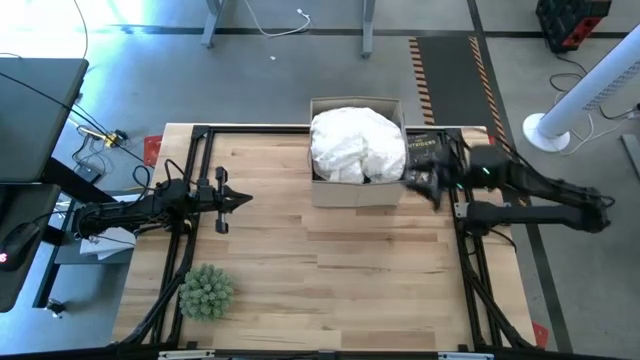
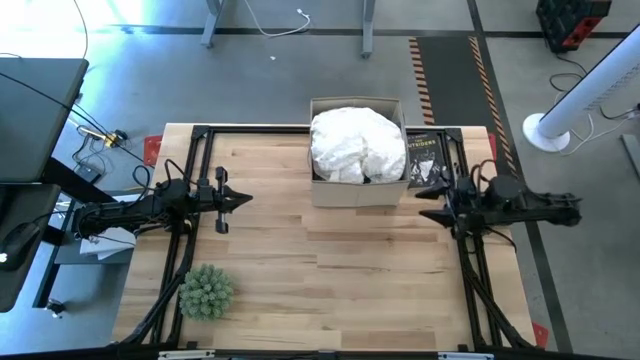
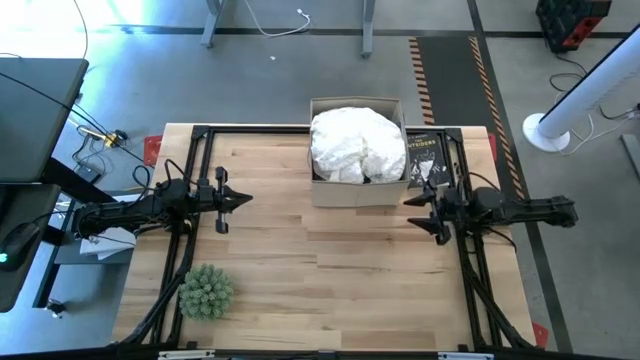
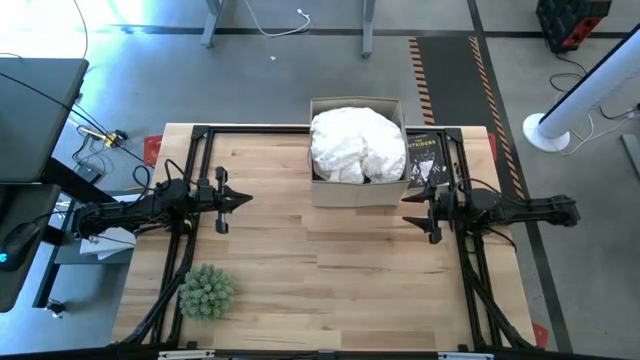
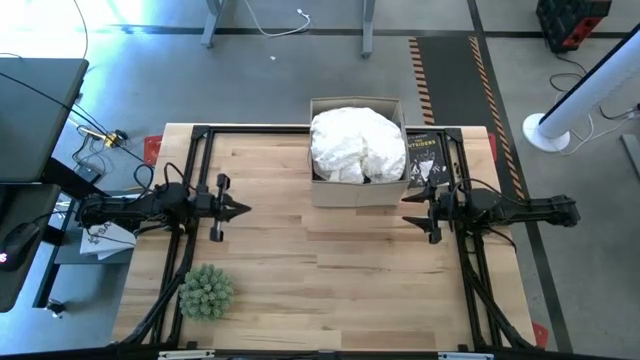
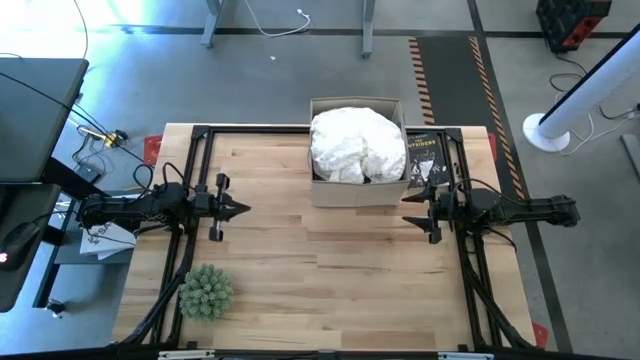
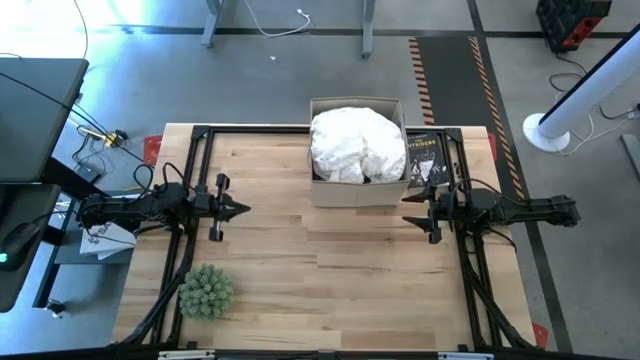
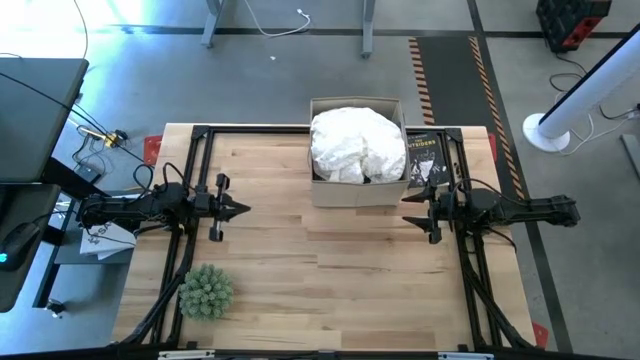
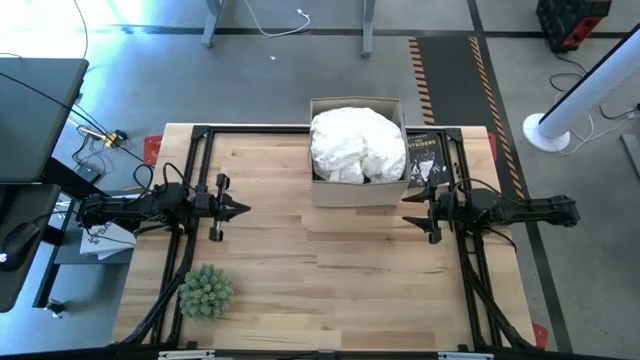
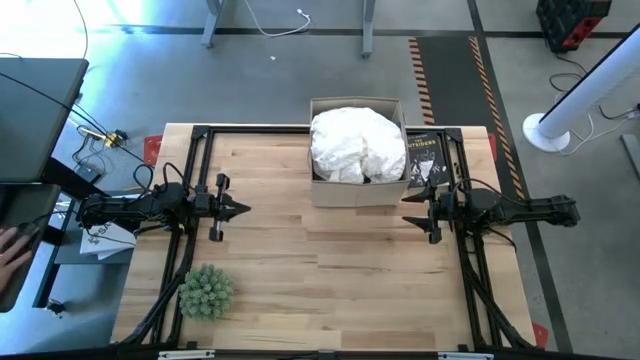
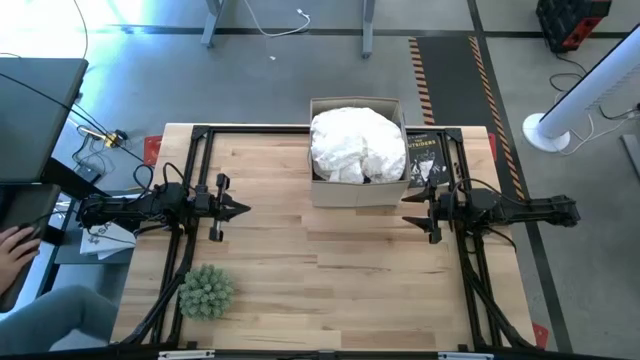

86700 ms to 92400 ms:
Task: Sort clothes
Return to Home Position

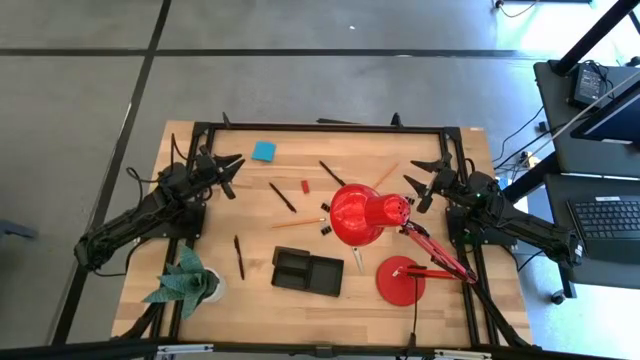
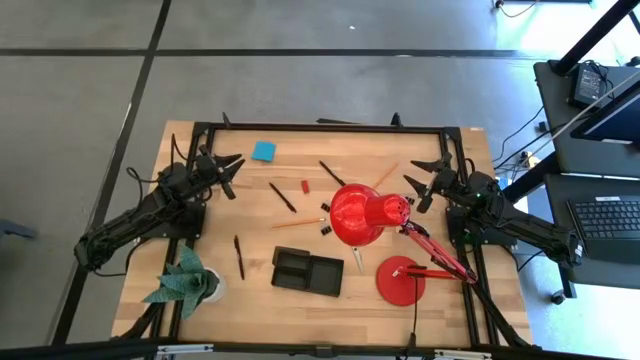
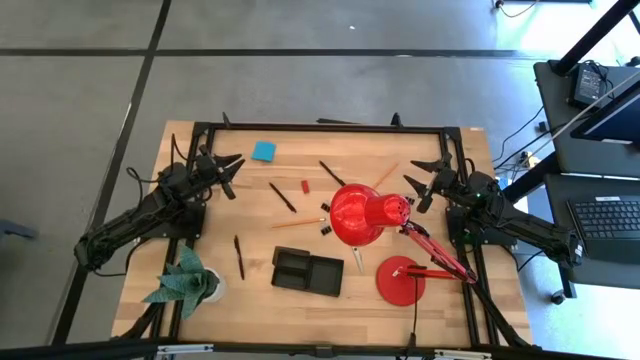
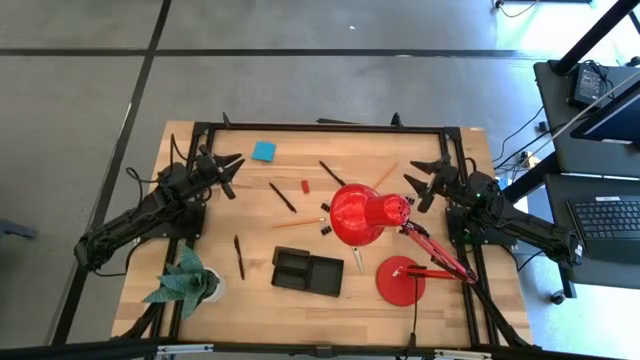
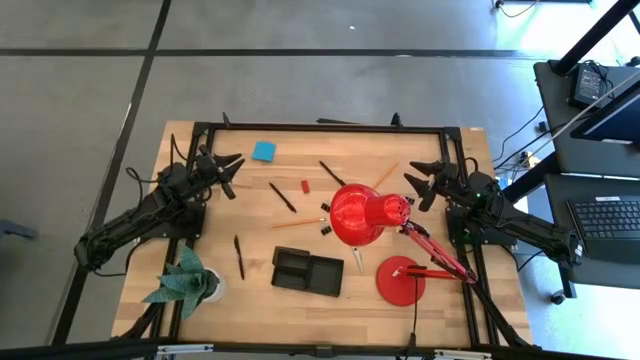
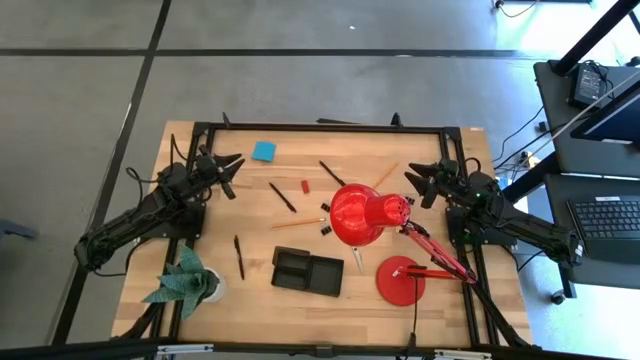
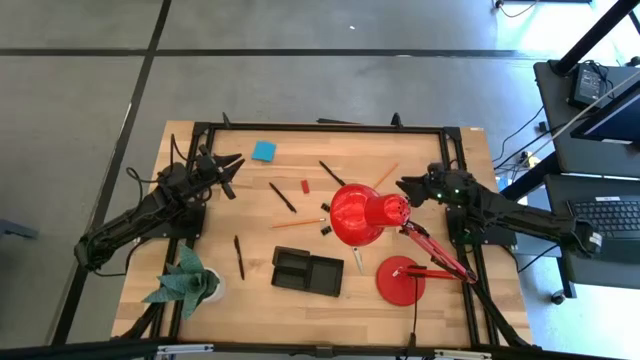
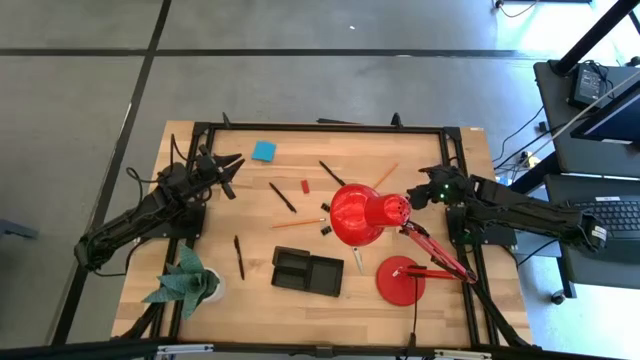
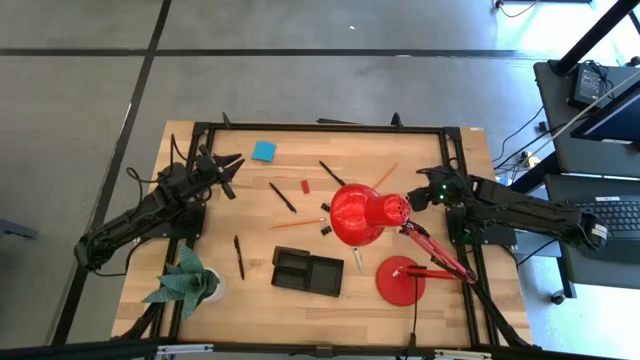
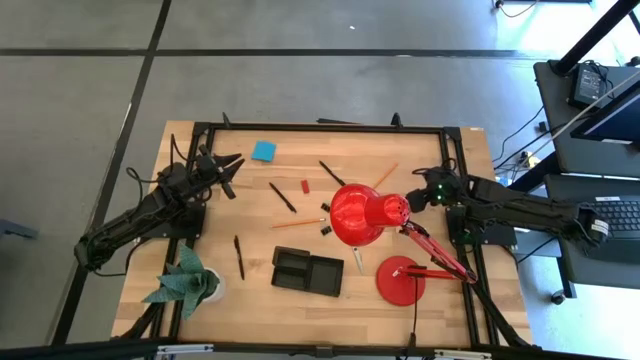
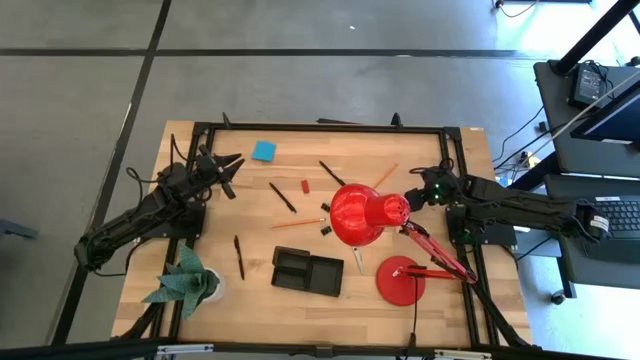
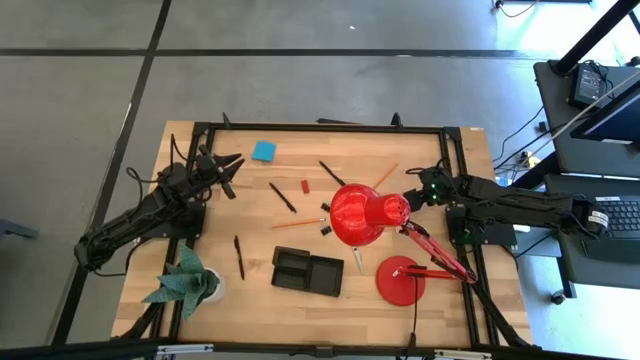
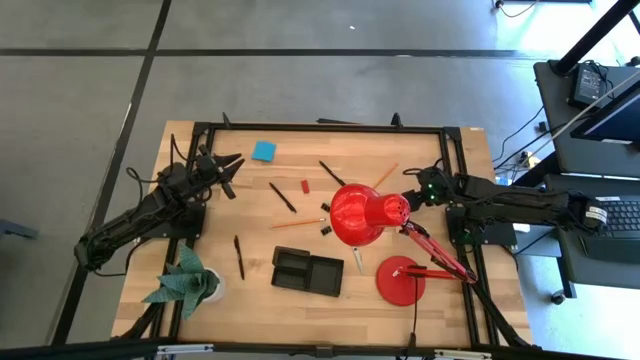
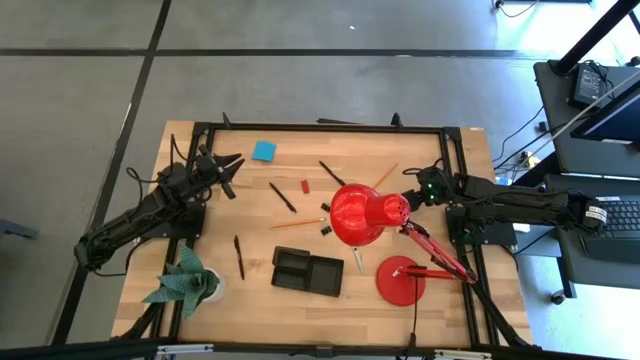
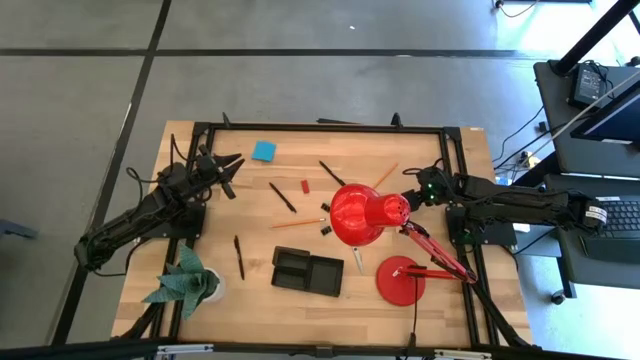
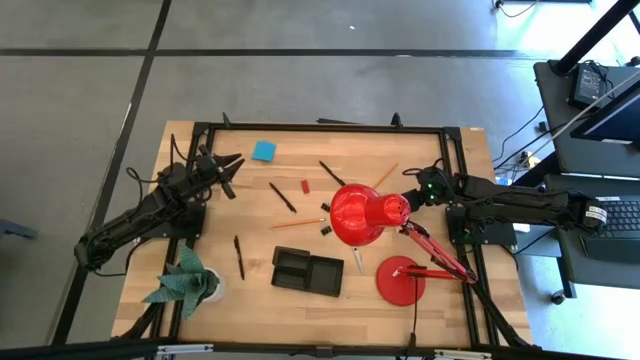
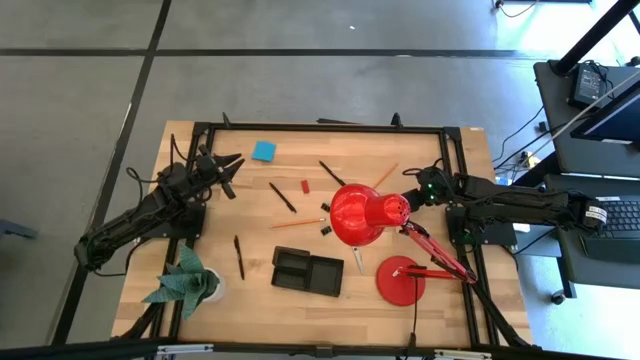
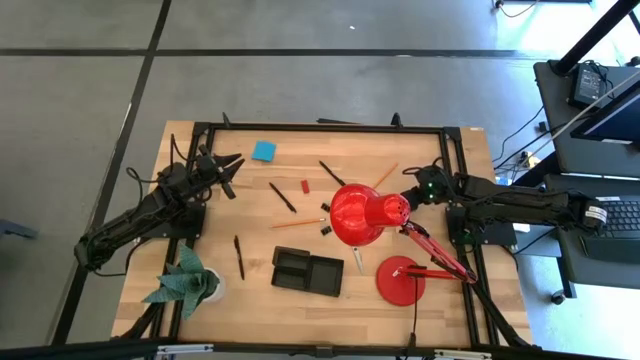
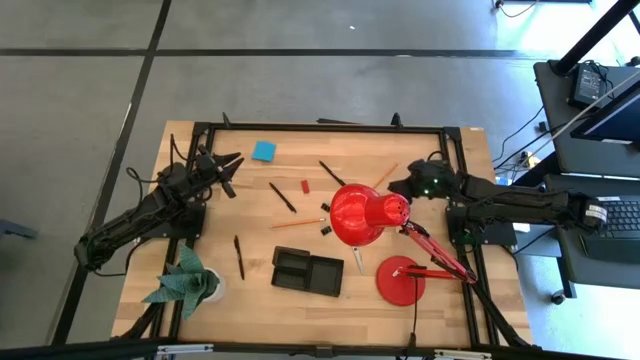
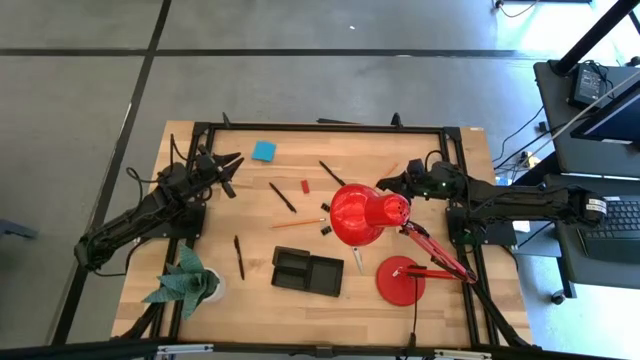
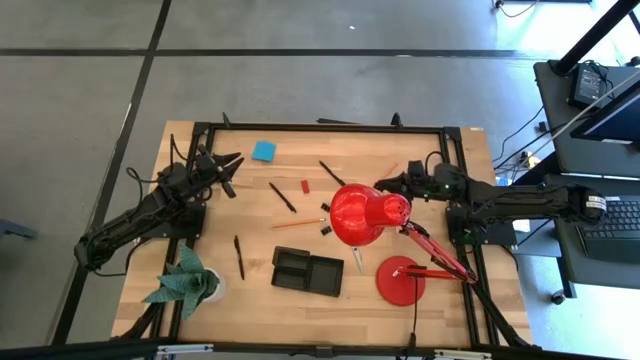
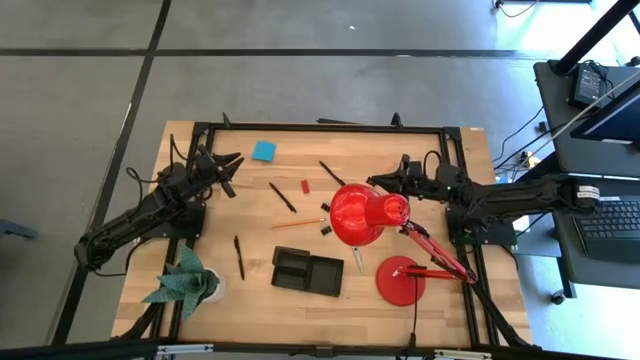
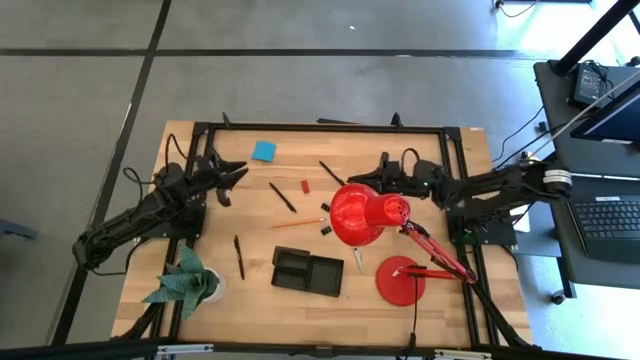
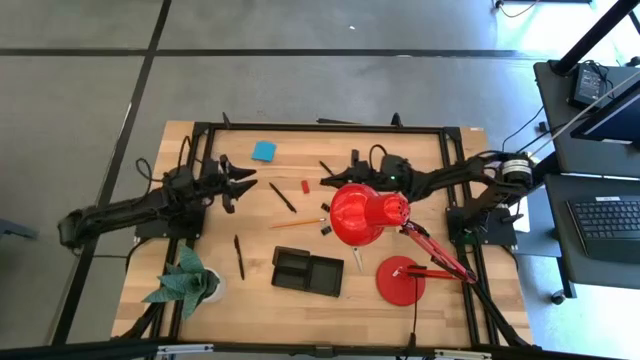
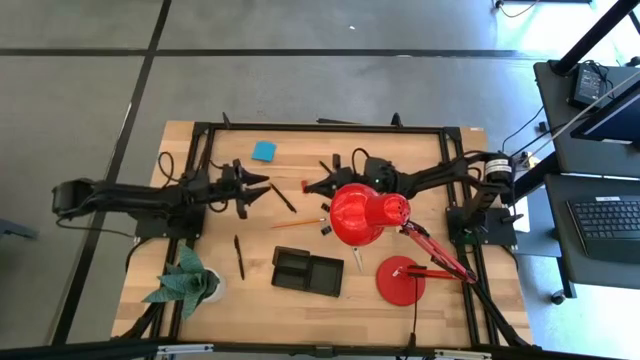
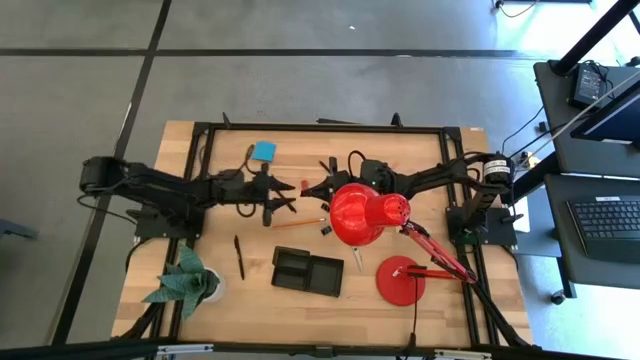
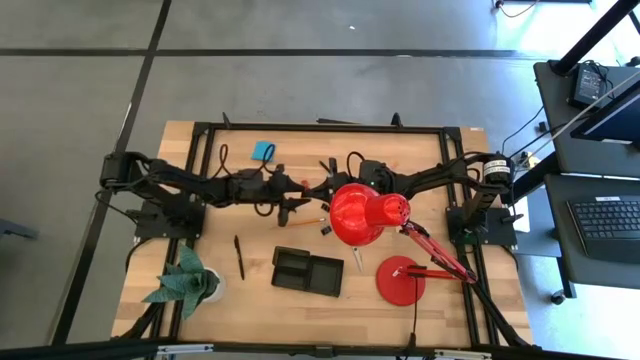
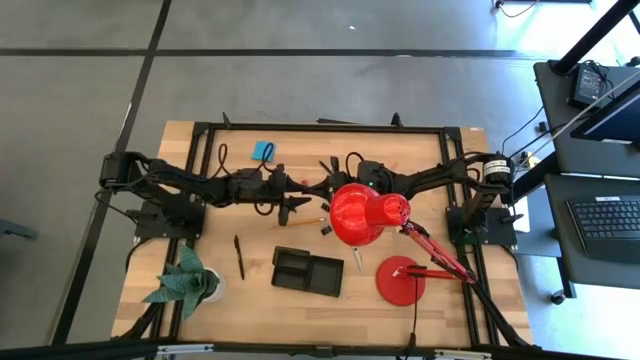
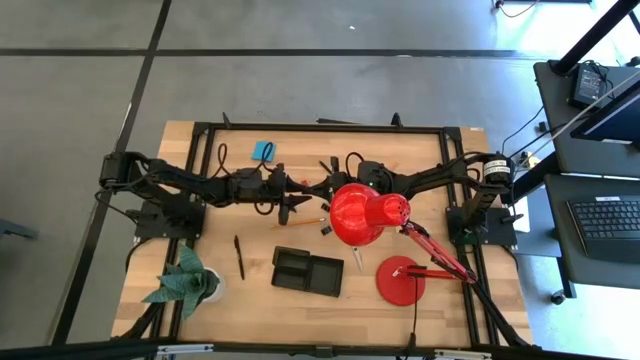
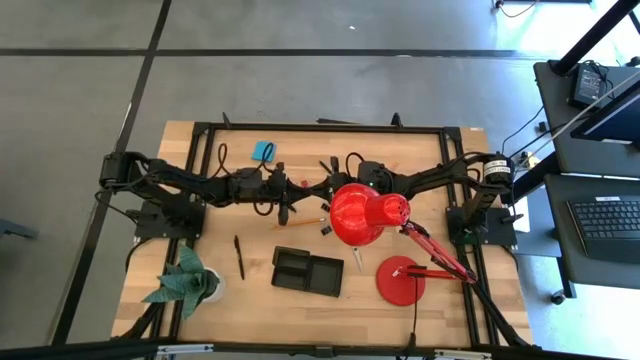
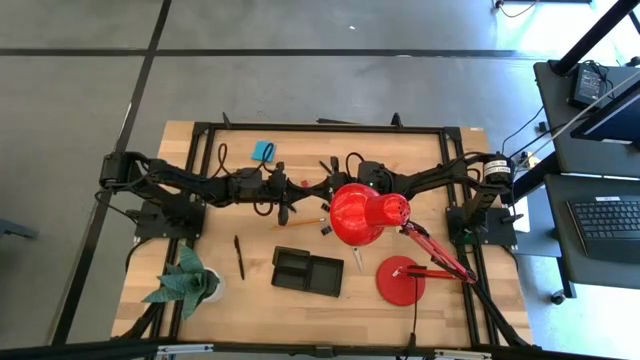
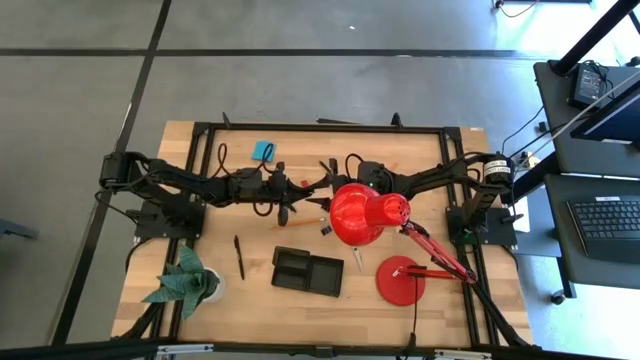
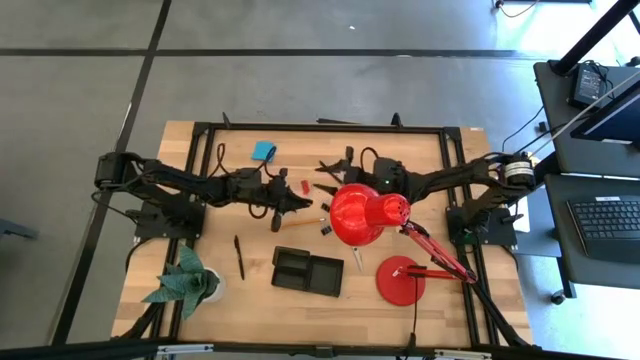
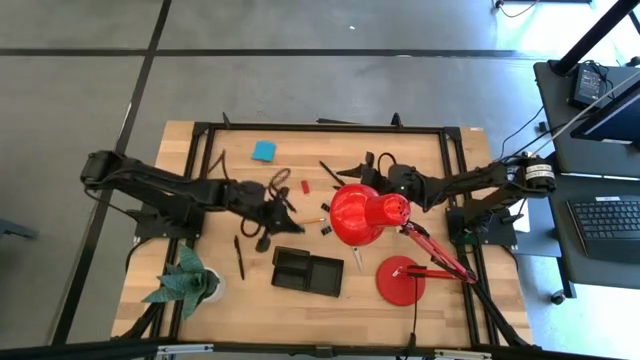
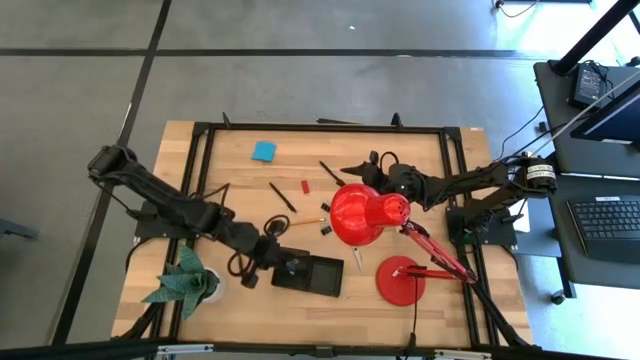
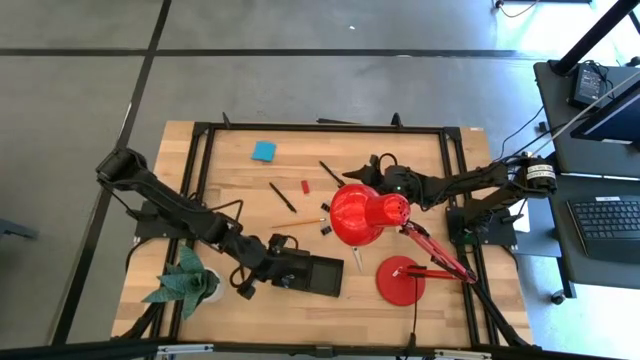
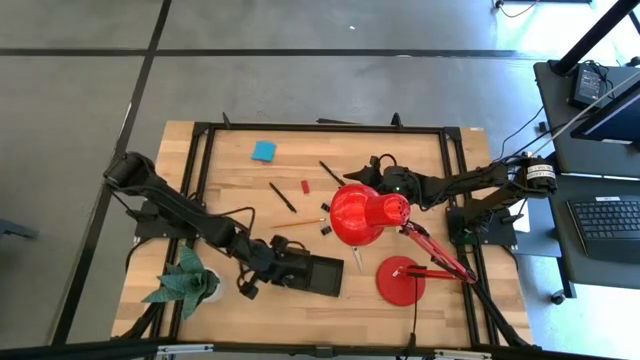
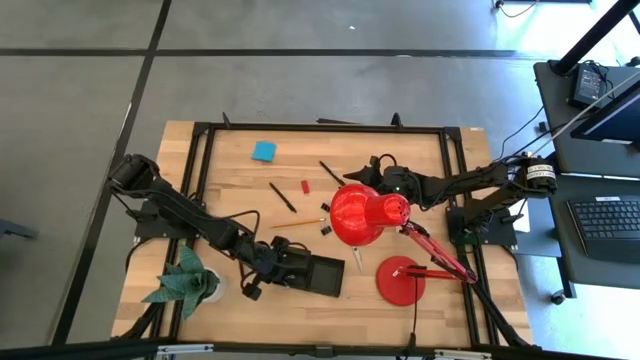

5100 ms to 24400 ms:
Task: Pick and place office supplies into organizer
Put the right black clip binder into the desk organizer
